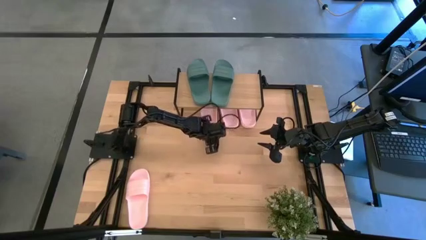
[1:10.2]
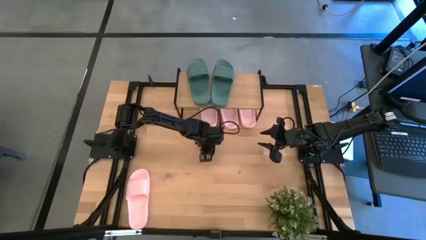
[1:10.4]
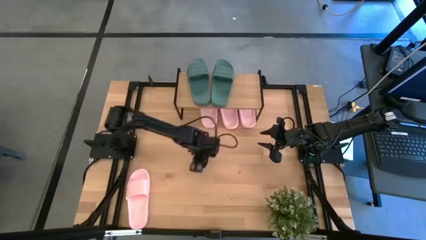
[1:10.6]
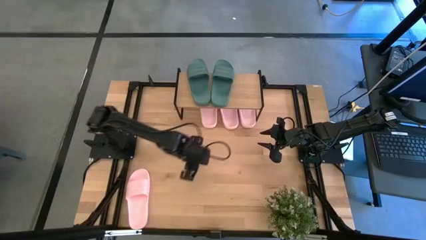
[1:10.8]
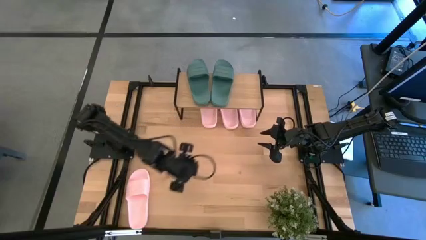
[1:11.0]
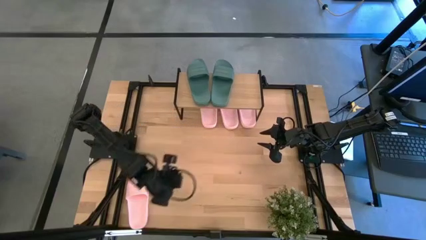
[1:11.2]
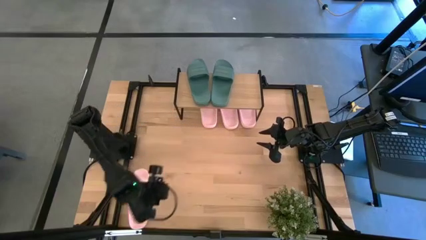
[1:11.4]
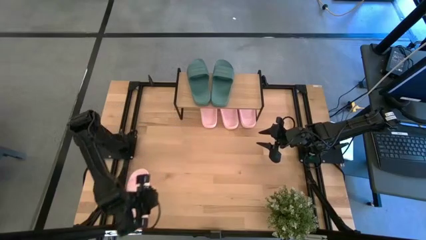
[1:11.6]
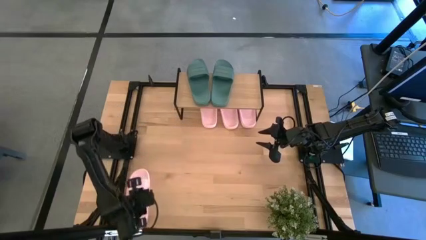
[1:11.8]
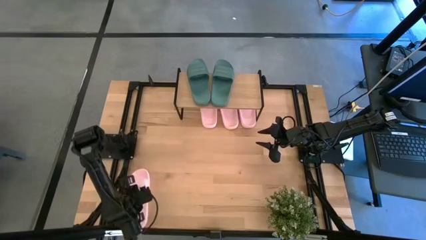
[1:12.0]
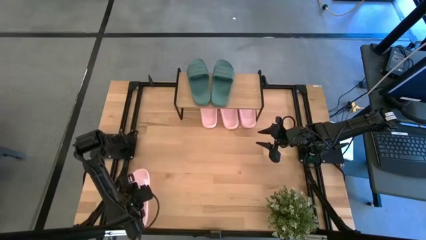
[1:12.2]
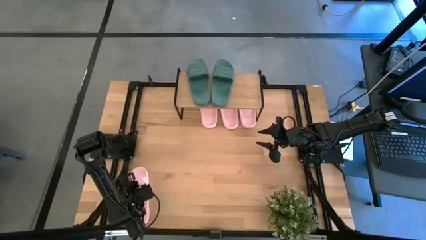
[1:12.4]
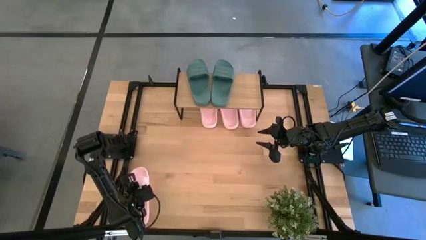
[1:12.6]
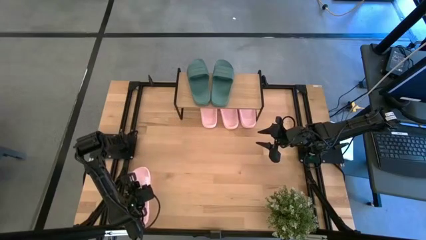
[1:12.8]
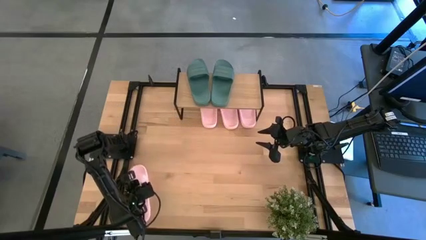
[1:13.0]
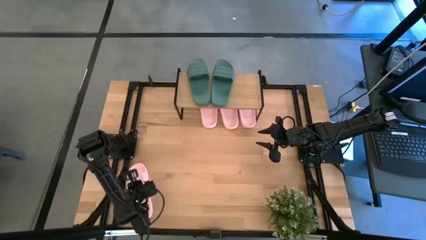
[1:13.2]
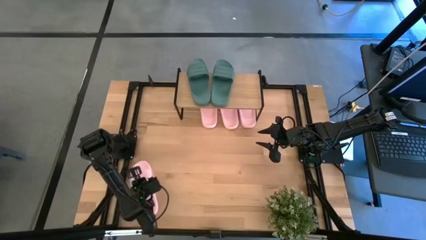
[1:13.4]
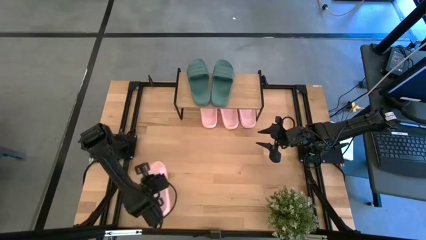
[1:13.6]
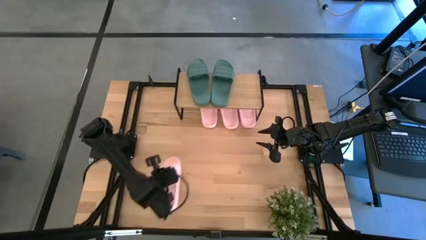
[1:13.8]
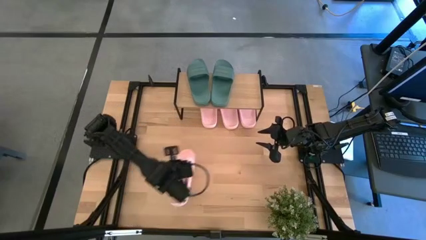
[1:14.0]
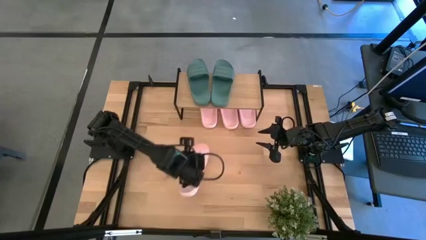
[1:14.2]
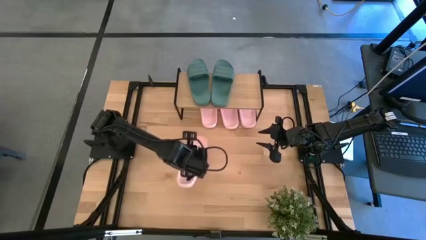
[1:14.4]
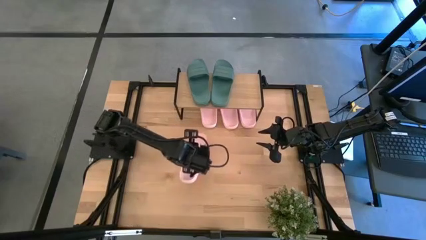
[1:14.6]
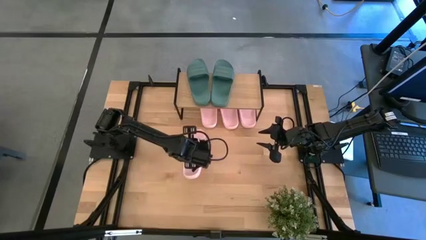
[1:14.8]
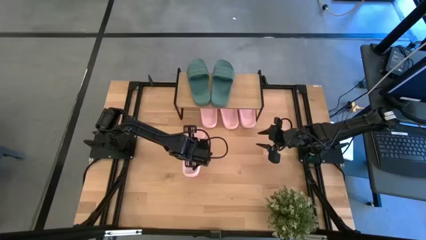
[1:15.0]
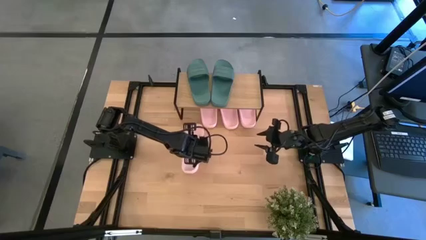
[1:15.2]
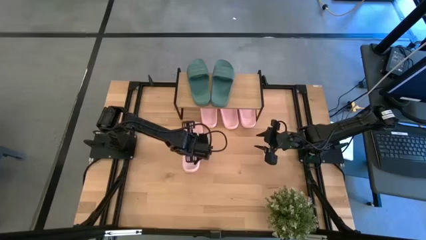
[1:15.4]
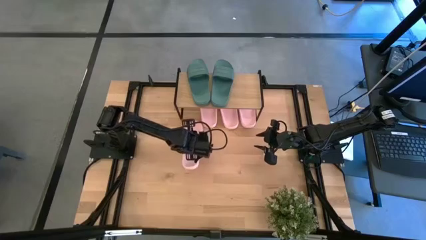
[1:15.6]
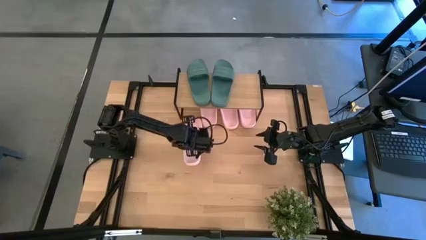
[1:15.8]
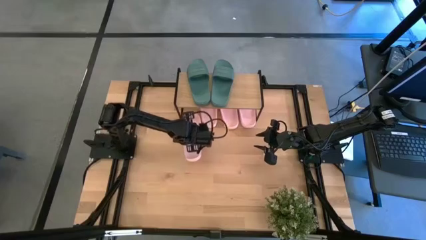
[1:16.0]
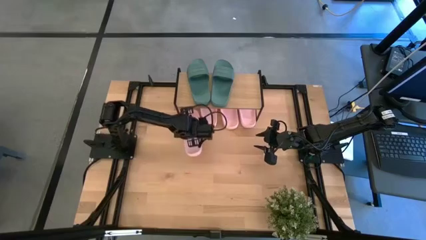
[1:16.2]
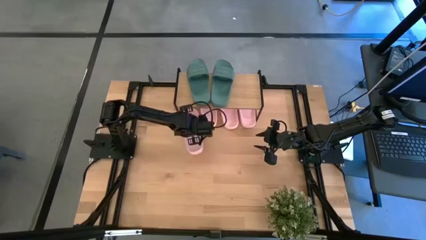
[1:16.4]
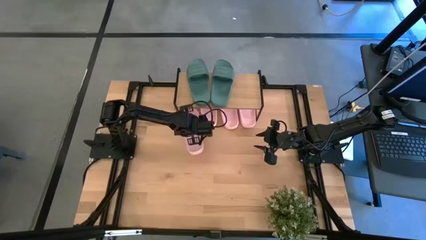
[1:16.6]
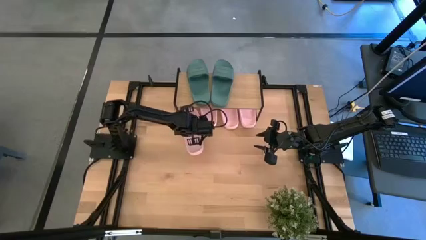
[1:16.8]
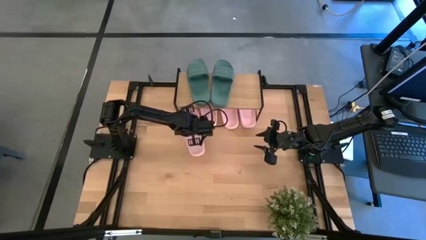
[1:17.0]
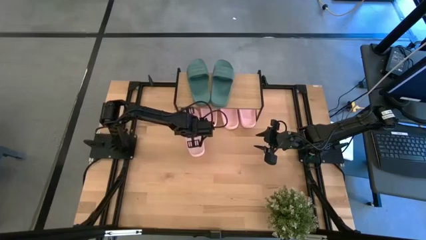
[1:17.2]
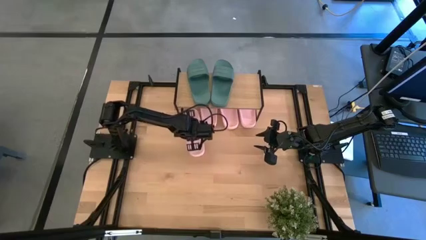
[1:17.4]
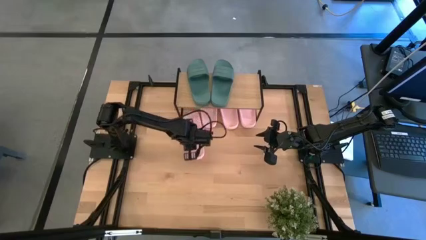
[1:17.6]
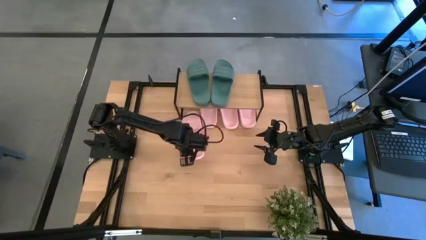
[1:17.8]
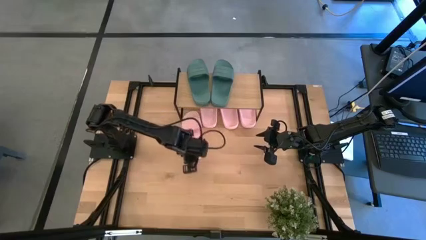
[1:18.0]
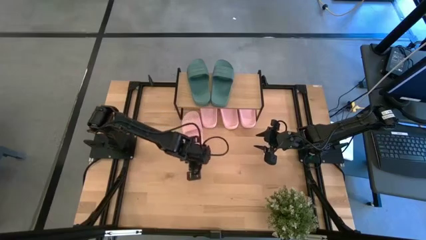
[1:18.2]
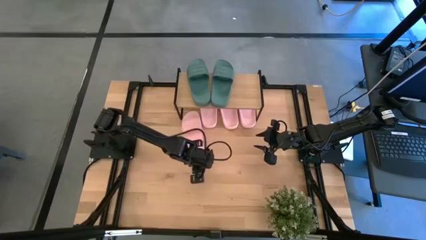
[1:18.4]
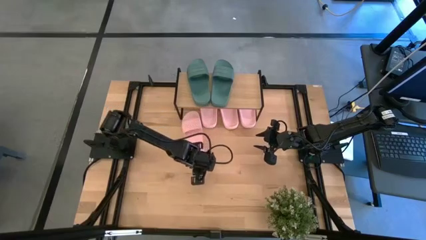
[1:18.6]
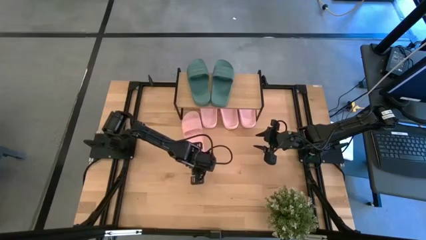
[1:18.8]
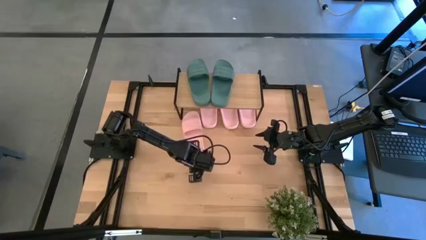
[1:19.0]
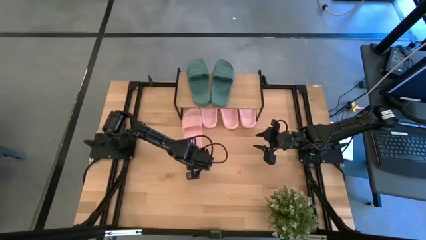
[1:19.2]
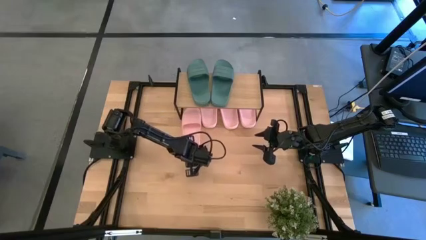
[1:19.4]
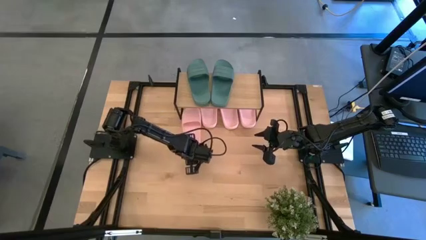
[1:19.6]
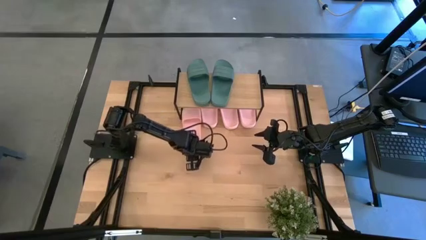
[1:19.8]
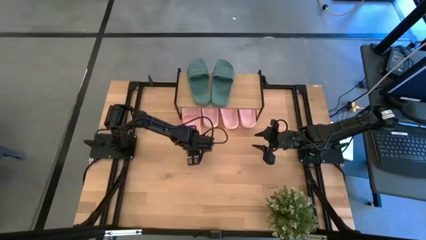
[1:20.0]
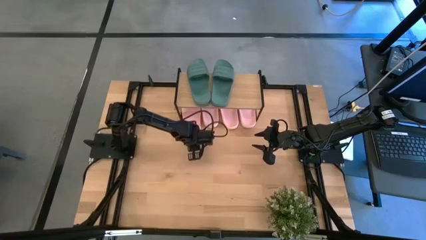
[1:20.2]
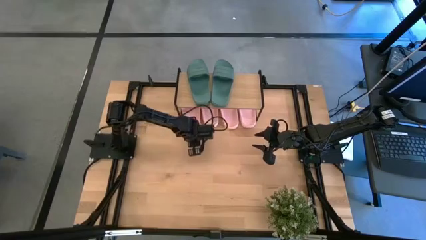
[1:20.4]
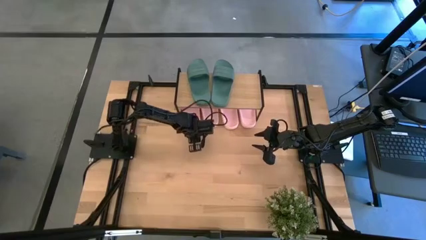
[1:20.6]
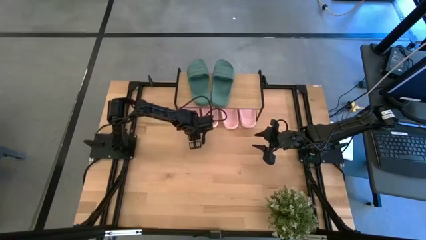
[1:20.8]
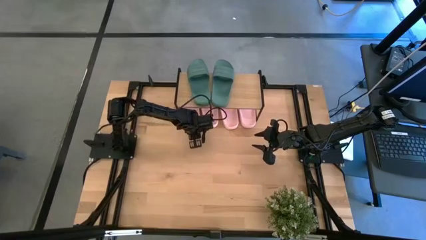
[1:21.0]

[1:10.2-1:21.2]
Task: Pick and place slides into the shelf
Put the pink slide under the shelf

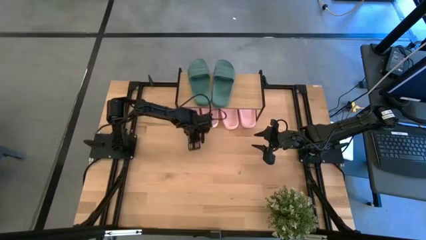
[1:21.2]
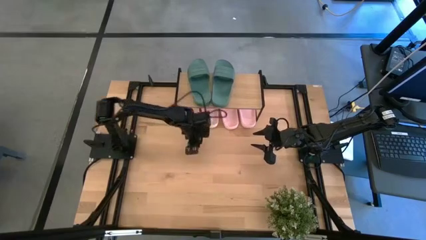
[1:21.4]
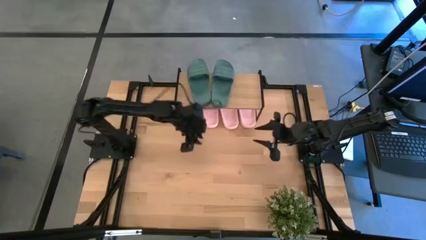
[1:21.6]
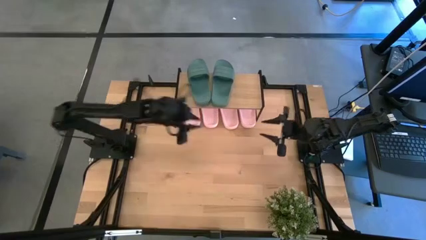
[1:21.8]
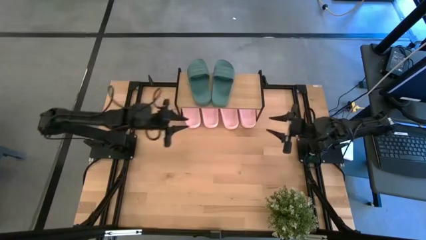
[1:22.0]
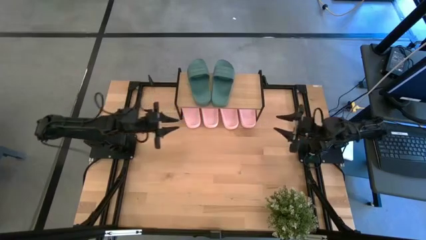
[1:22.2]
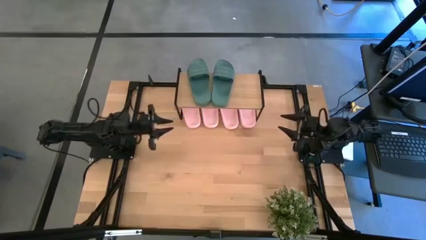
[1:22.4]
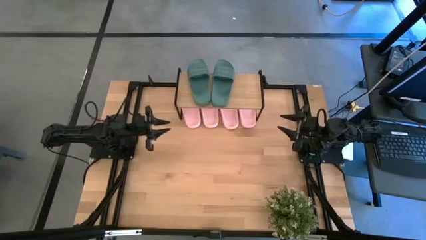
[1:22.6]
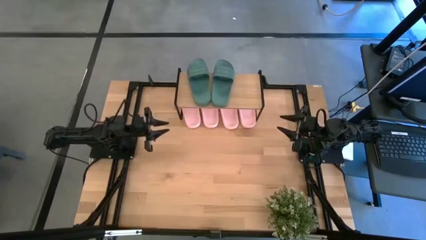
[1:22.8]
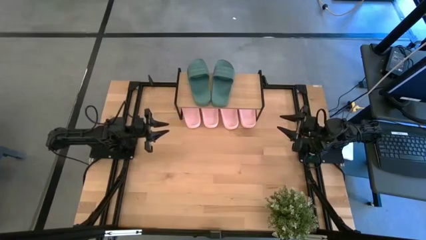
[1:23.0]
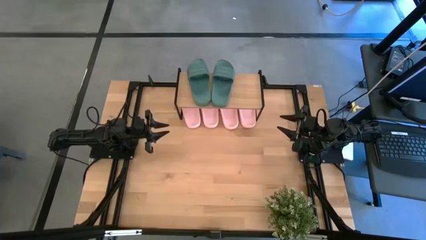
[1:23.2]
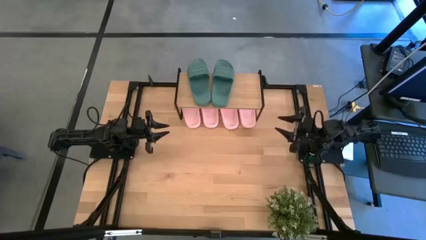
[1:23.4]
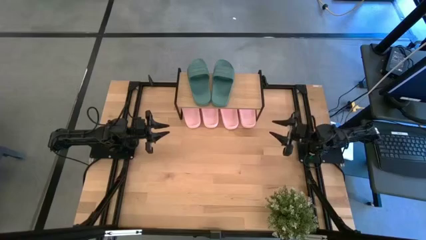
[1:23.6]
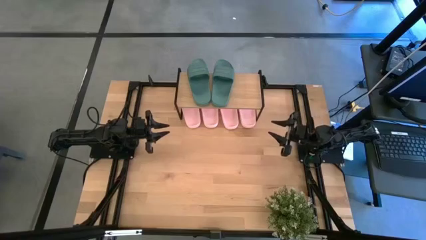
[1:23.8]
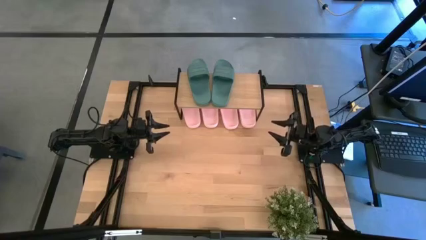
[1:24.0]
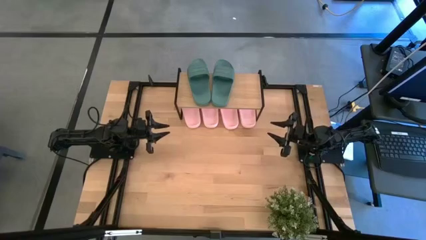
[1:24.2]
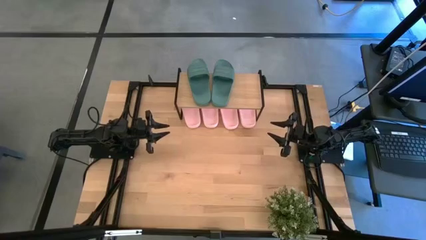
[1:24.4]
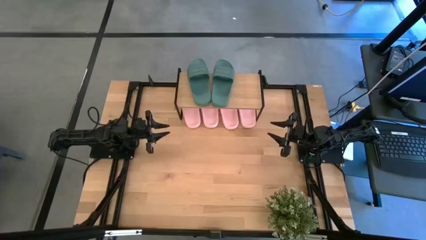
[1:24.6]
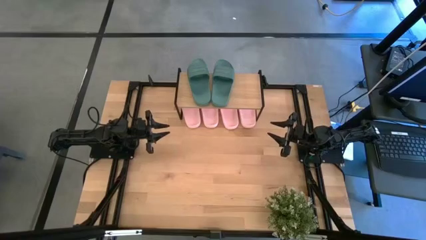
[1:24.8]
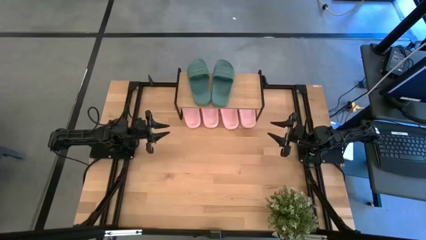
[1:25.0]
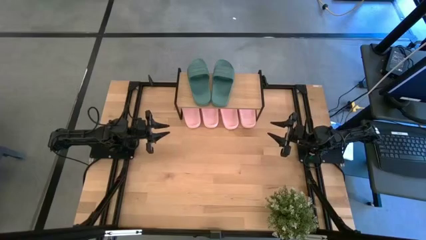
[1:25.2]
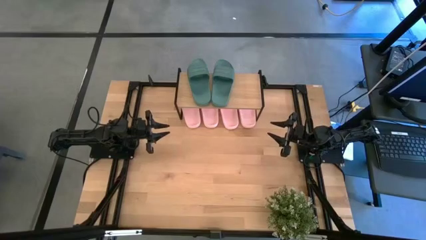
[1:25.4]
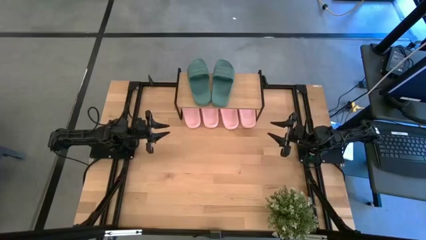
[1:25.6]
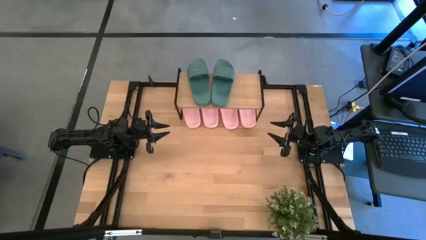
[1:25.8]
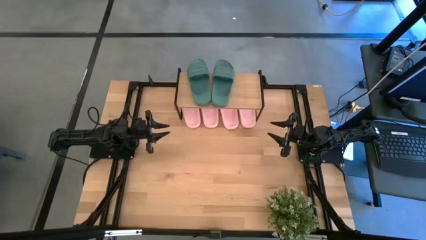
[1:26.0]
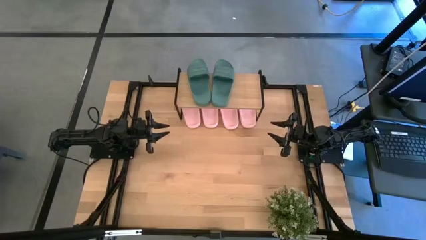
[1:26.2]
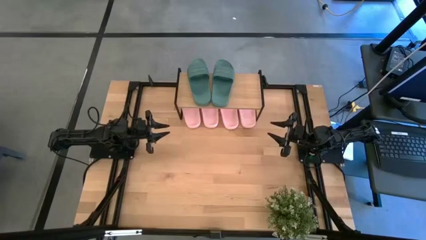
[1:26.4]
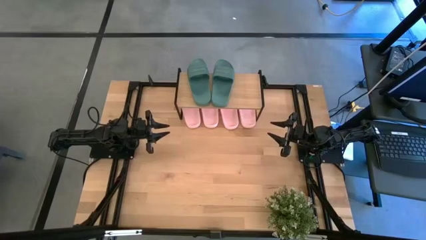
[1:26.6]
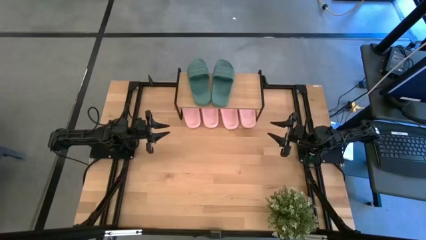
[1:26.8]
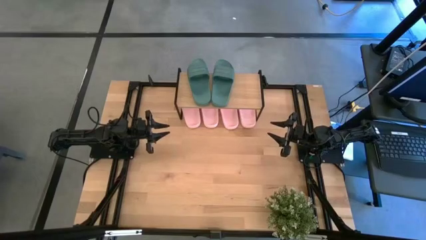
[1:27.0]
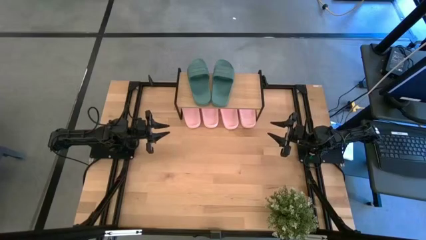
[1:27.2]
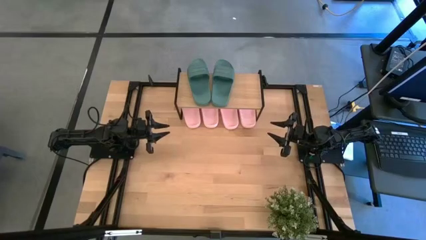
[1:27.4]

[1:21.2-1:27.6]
Return to Home Position

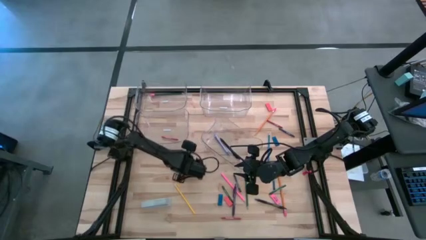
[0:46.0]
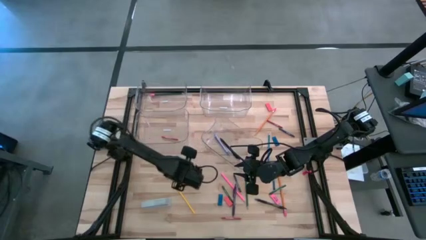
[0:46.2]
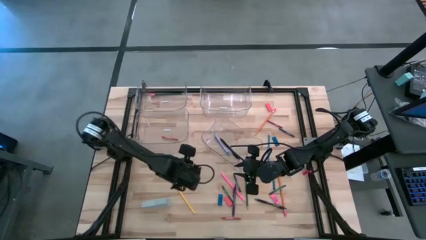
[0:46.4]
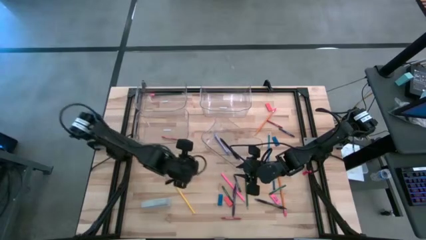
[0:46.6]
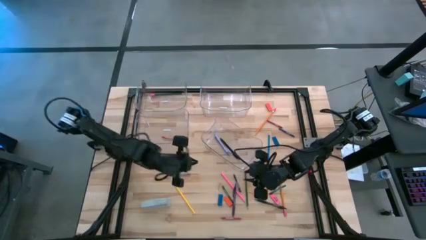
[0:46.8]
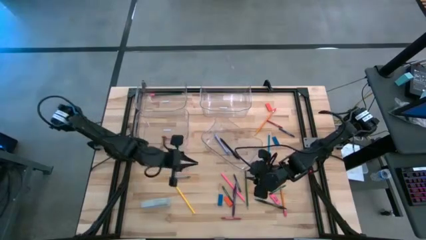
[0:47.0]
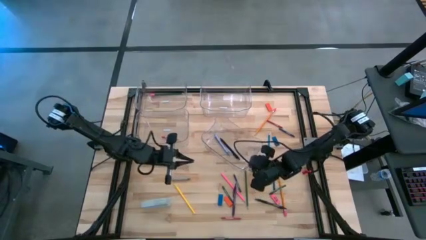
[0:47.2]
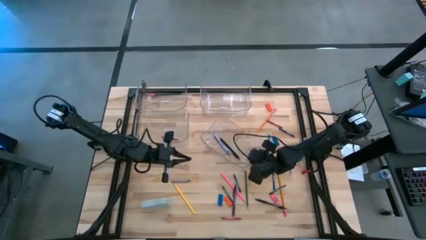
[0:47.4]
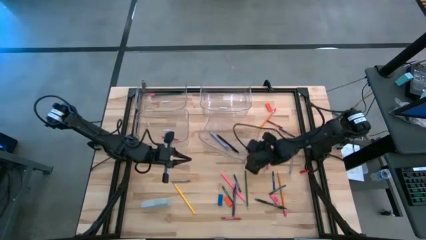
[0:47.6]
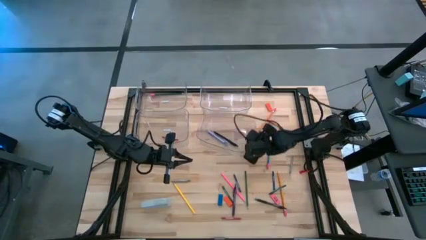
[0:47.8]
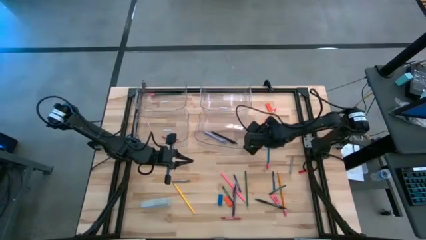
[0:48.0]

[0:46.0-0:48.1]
Task: Sort crayons/erasers/pens/pencils in bins
Adjust the bottom right transparent bin
